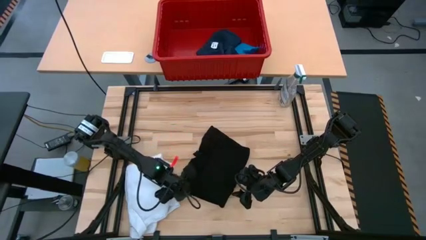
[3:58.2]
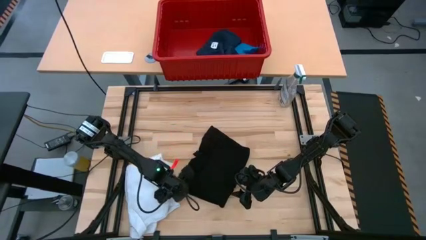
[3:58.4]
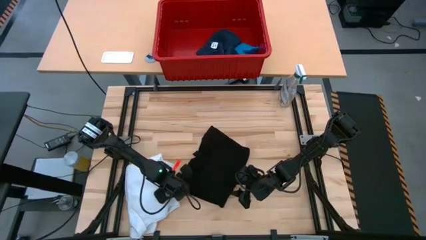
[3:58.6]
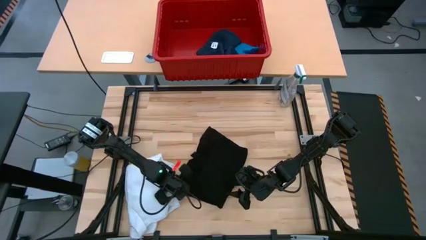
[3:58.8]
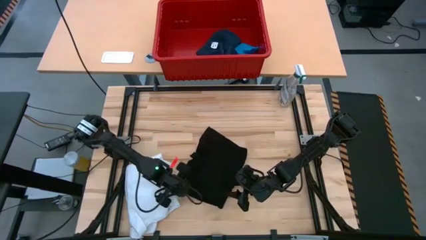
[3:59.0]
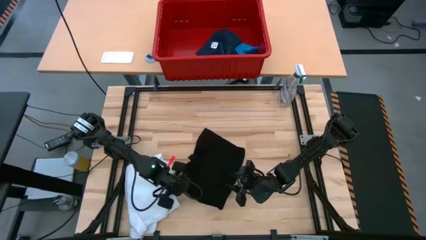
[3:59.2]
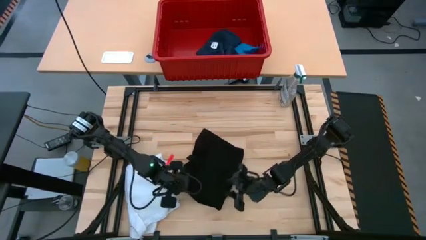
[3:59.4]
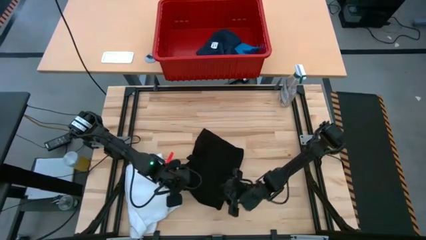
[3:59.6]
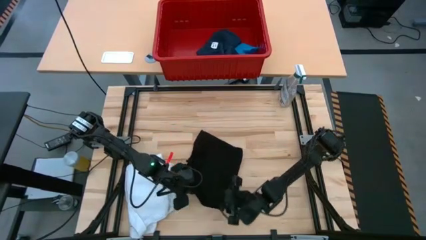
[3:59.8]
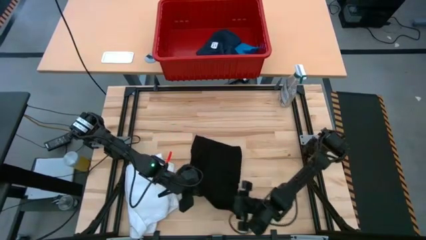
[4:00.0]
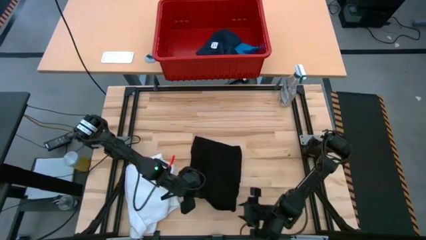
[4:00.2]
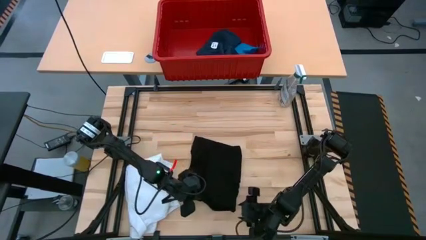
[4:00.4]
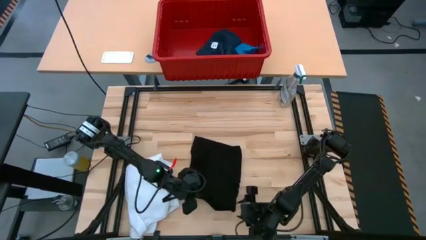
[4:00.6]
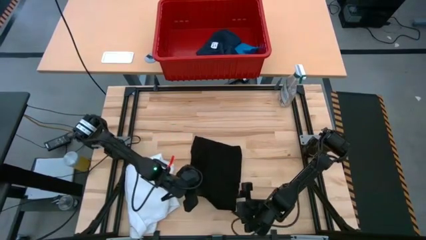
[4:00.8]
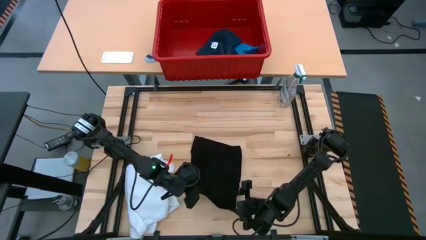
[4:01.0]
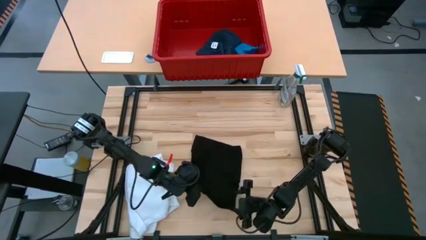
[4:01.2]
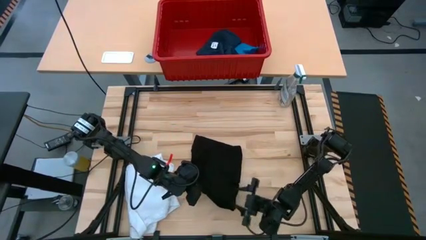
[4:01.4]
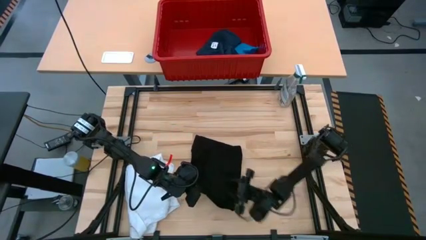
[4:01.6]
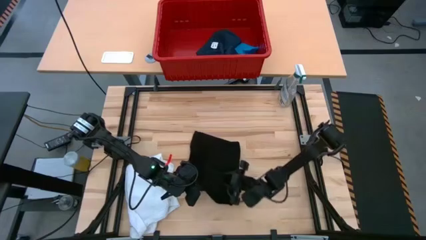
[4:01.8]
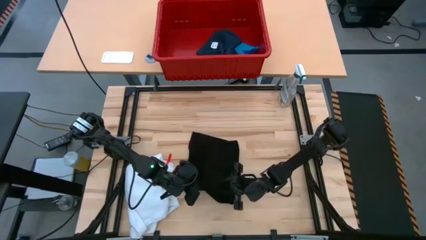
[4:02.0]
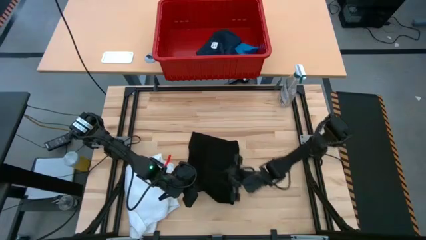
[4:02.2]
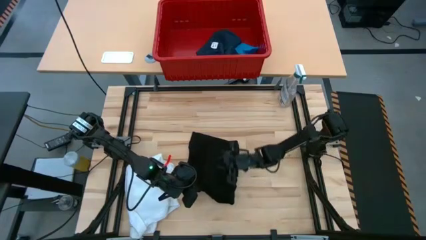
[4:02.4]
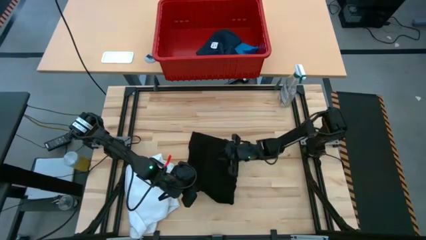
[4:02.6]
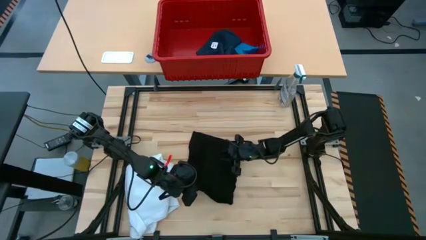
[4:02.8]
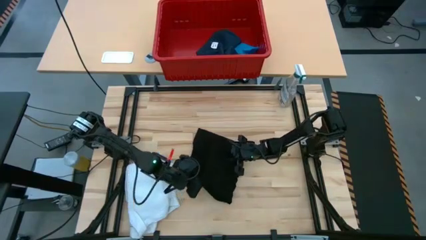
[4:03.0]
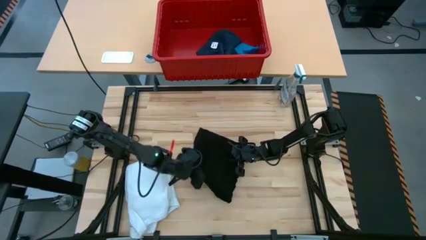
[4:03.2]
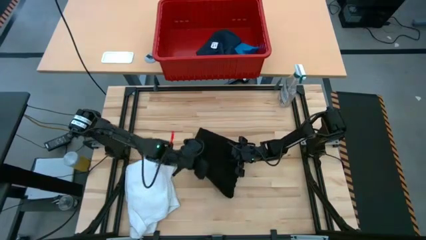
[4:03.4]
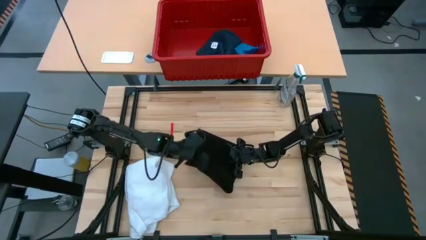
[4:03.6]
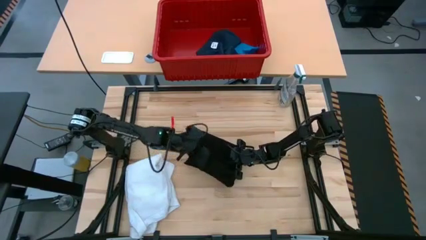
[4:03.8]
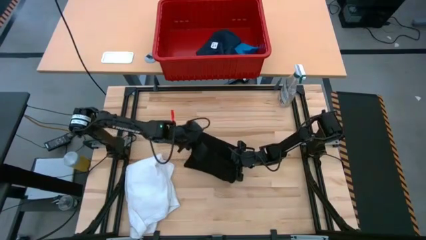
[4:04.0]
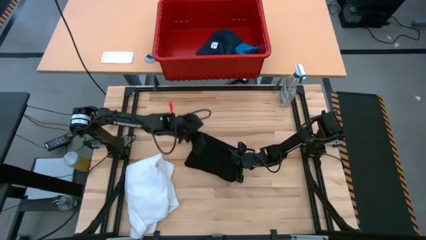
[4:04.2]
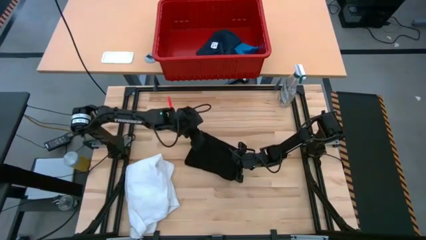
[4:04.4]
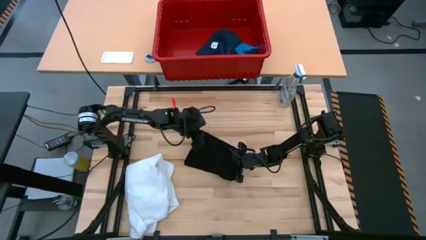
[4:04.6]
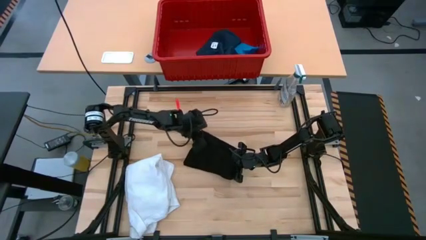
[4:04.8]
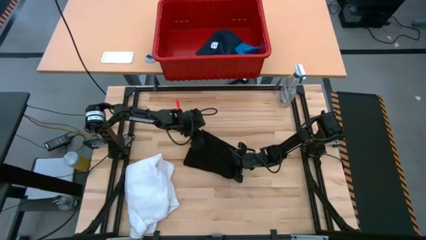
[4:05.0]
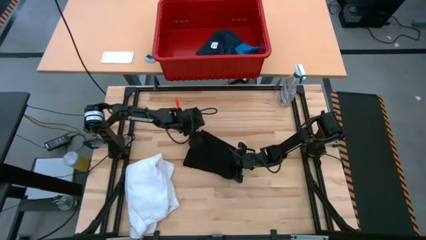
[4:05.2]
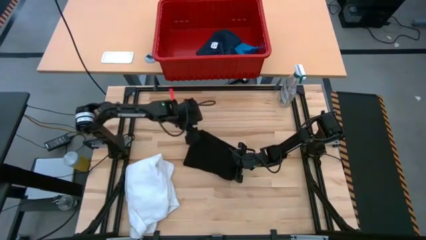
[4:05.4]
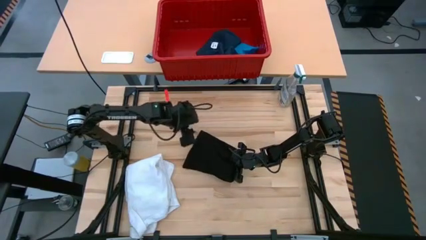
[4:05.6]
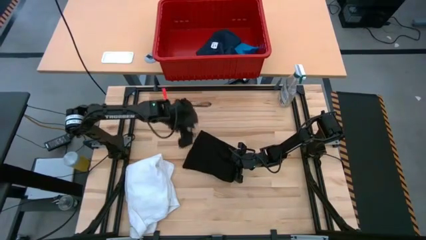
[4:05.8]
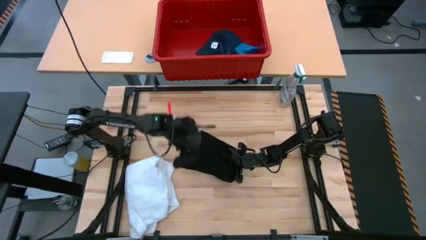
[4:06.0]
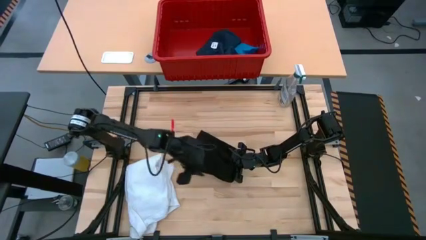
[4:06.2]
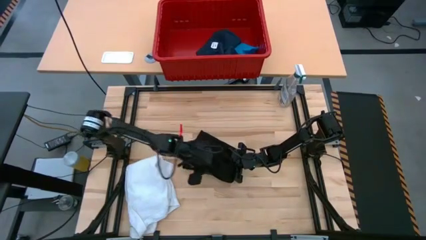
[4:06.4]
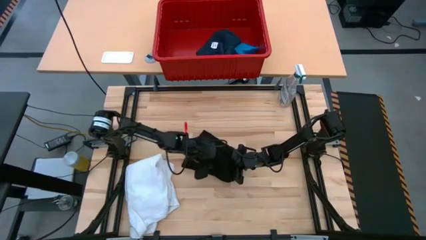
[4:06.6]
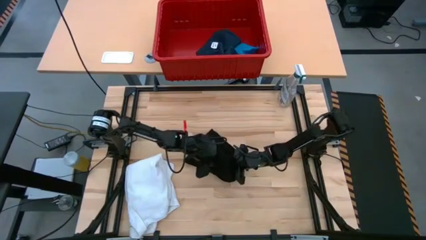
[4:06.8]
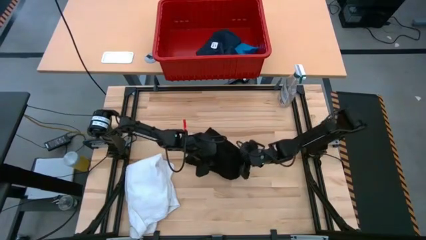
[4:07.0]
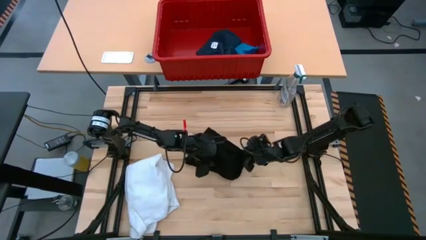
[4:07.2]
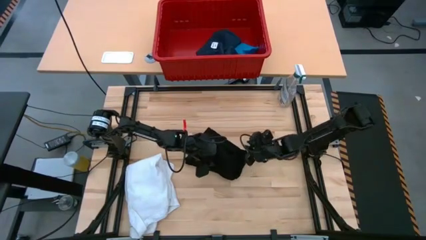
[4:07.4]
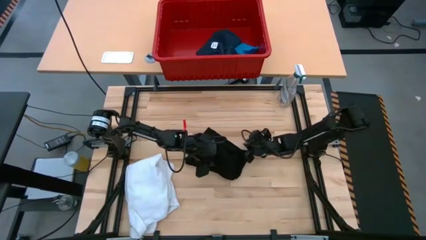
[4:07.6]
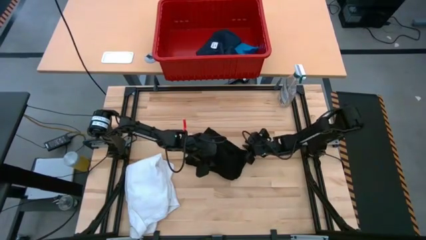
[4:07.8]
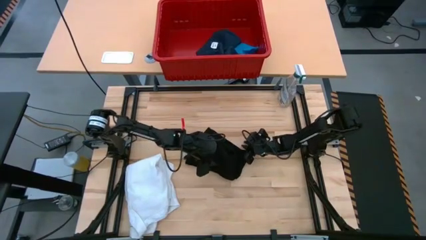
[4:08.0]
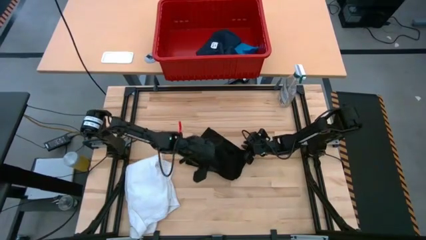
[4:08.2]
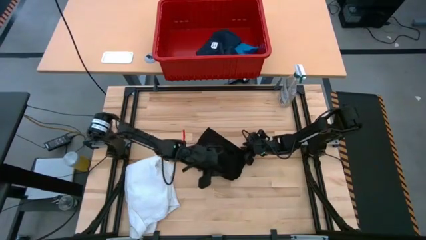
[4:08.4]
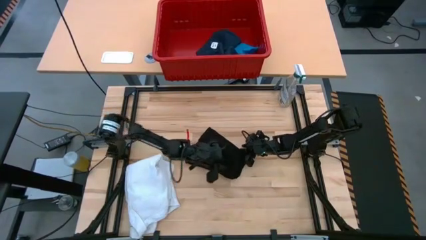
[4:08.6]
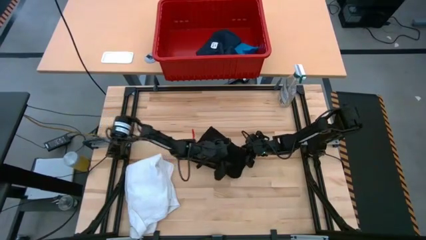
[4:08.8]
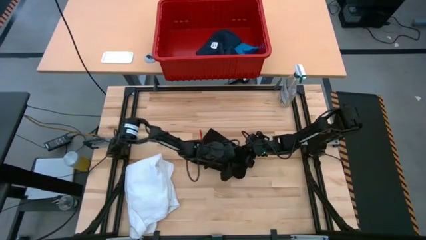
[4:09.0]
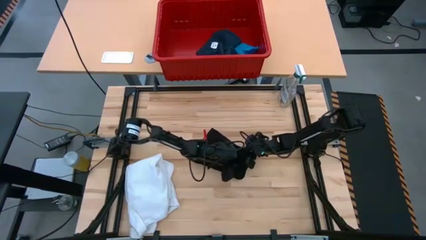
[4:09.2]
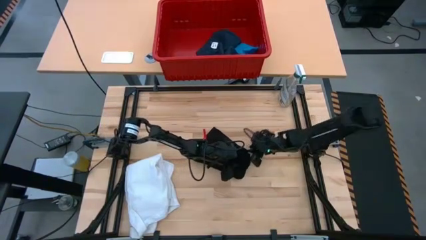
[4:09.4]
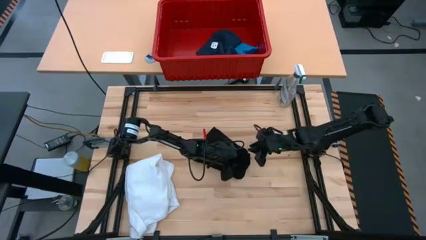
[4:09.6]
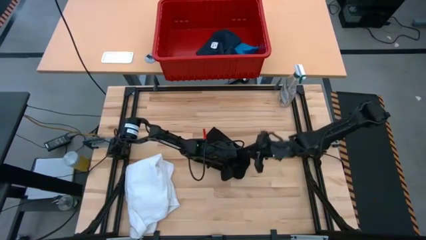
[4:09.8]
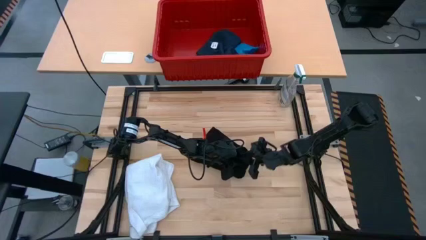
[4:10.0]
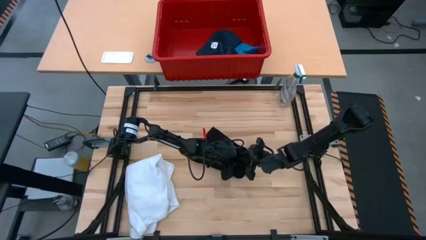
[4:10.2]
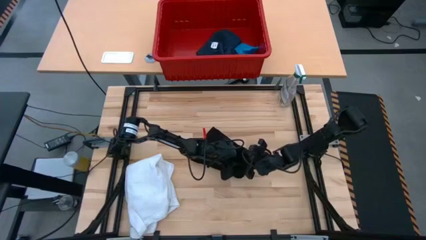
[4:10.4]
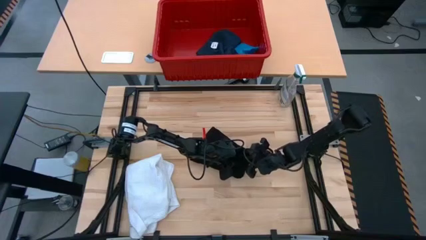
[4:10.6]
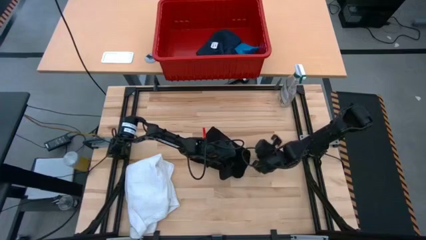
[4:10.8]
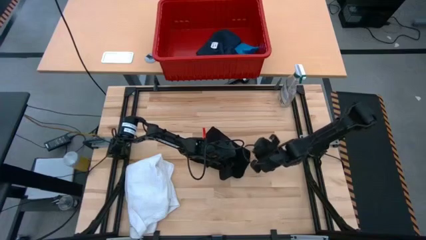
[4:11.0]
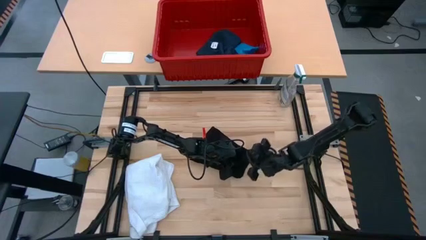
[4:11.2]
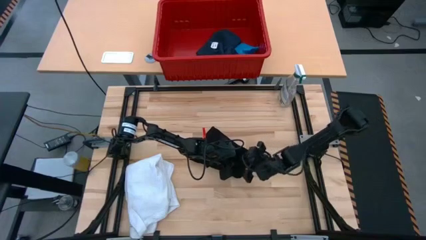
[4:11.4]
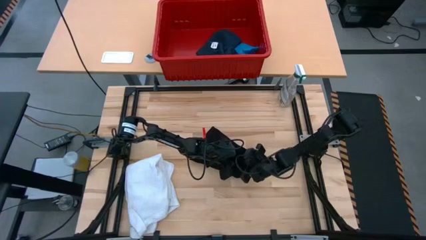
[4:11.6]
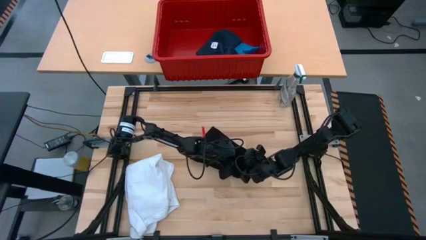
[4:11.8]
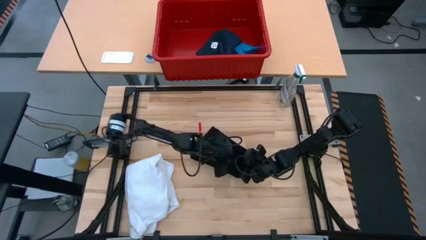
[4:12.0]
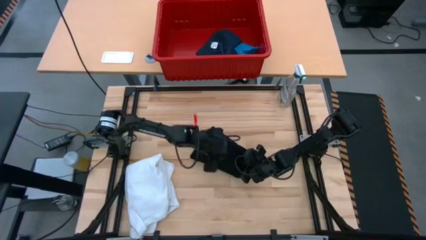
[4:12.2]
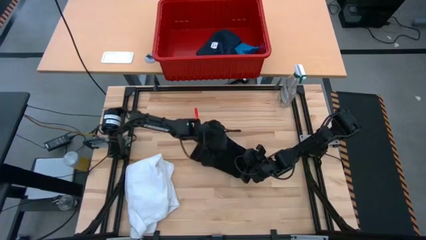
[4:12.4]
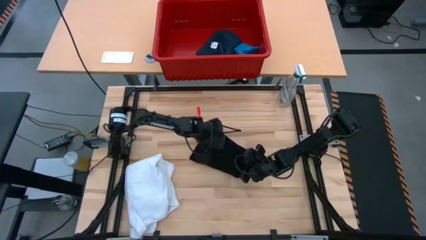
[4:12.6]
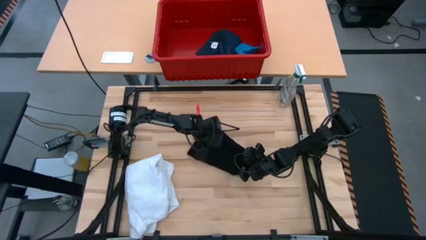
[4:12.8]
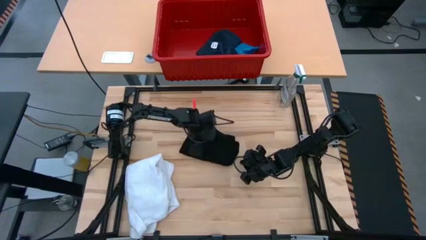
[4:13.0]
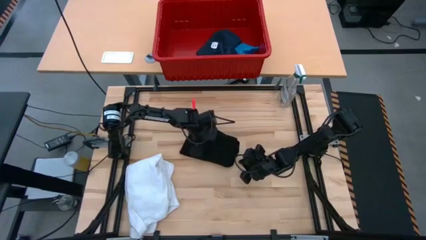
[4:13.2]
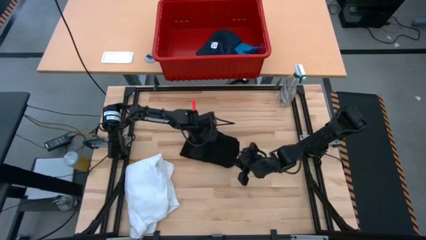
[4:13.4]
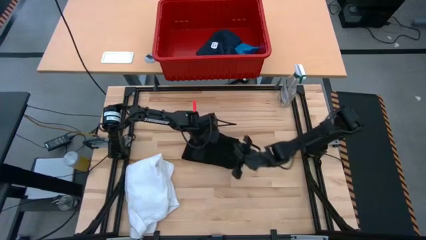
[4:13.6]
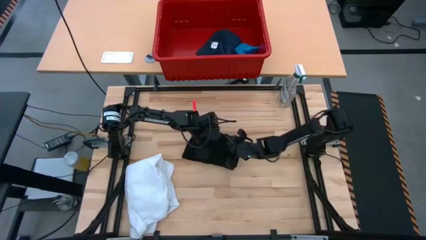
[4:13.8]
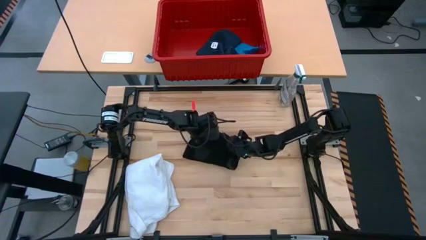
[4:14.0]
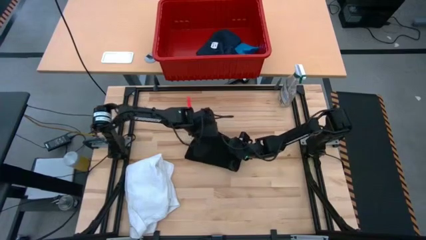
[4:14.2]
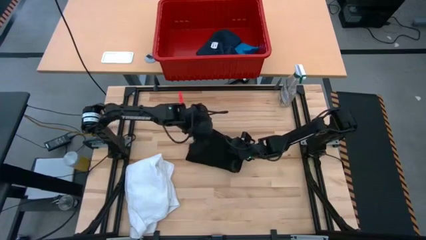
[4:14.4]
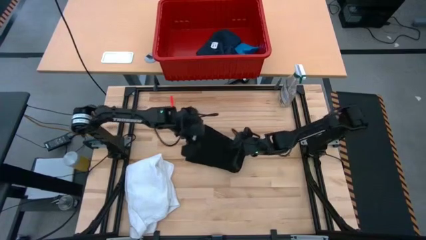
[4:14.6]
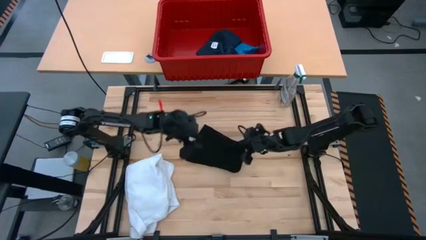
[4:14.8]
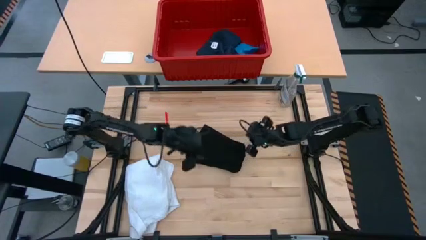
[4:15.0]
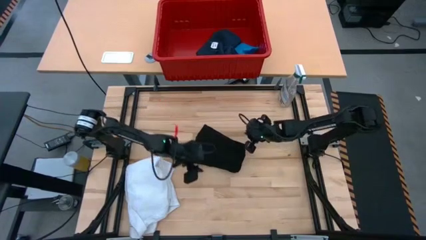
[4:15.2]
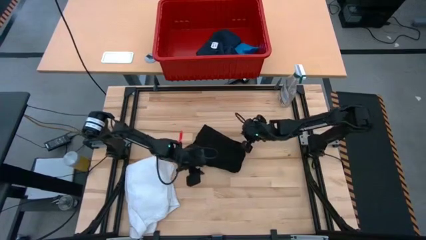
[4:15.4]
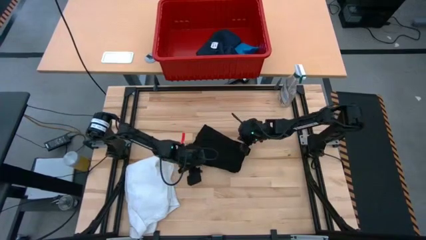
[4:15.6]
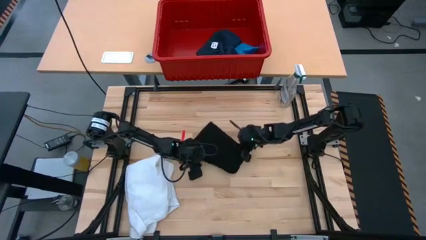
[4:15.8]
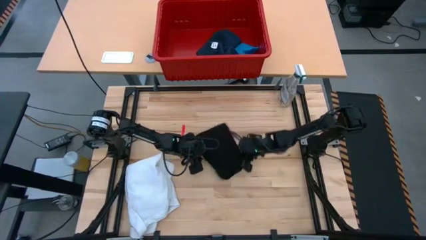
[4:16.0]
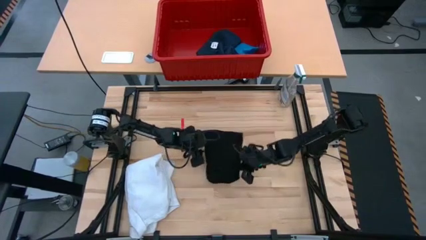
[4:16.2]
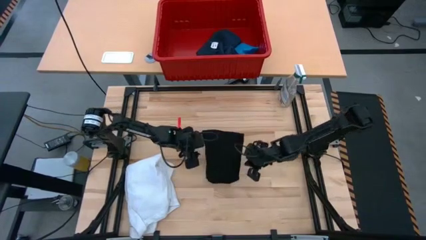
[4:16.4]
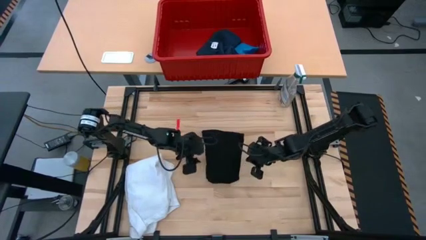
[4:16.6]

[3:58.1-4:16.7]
Task: Fold Laundry from Bin
Fold the black shirt
